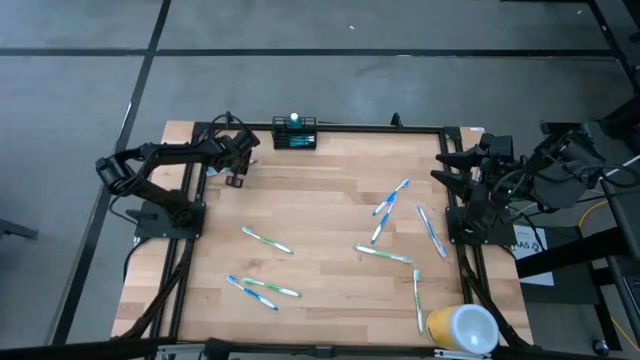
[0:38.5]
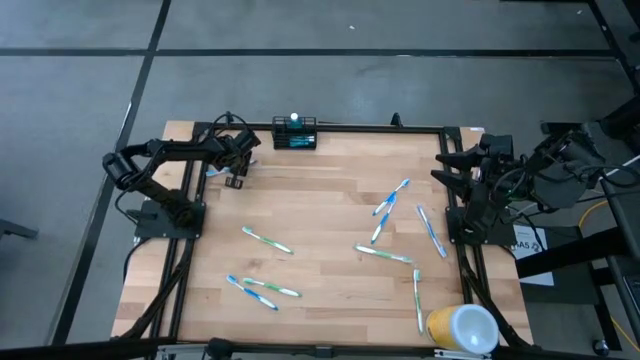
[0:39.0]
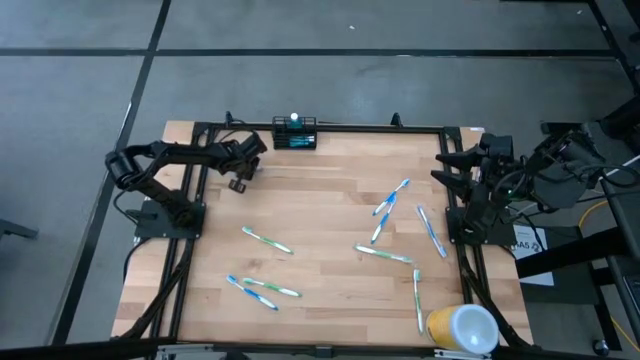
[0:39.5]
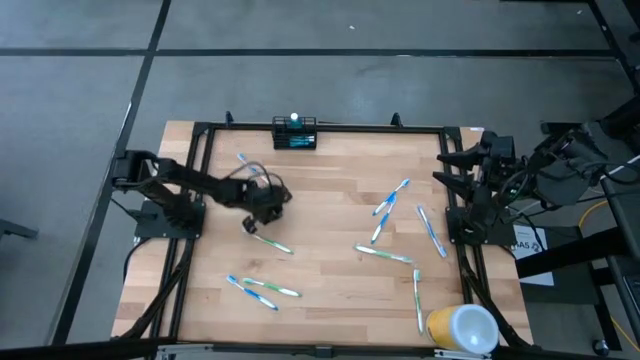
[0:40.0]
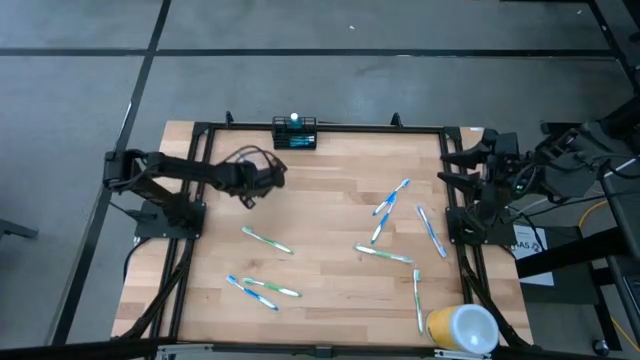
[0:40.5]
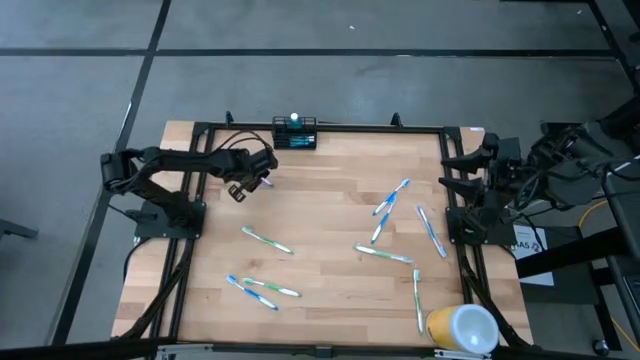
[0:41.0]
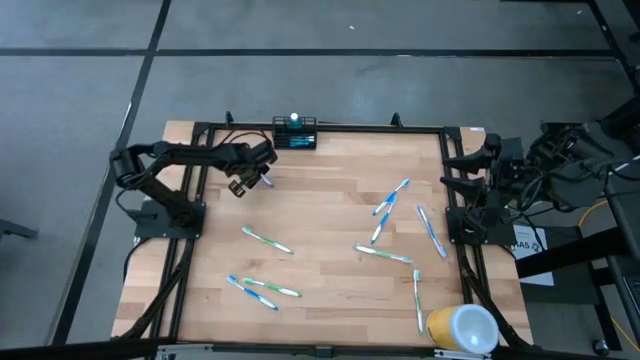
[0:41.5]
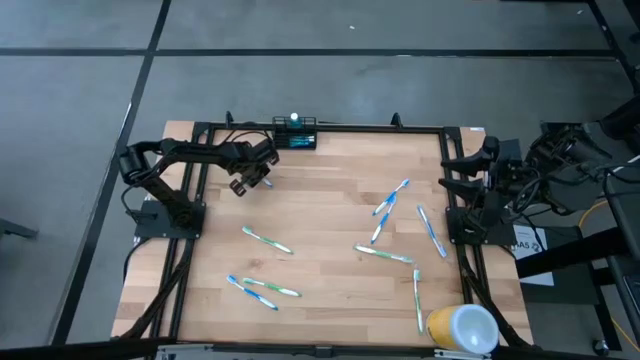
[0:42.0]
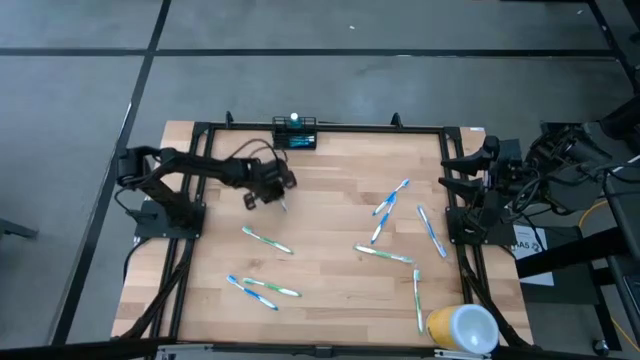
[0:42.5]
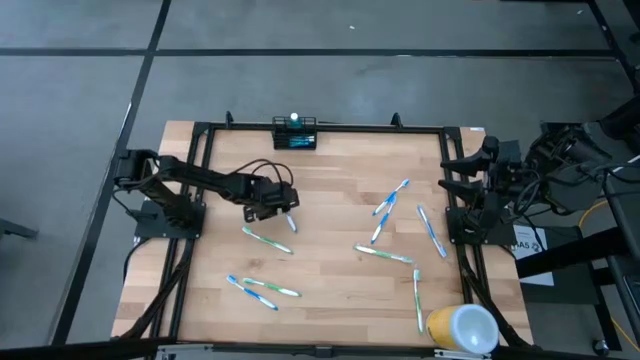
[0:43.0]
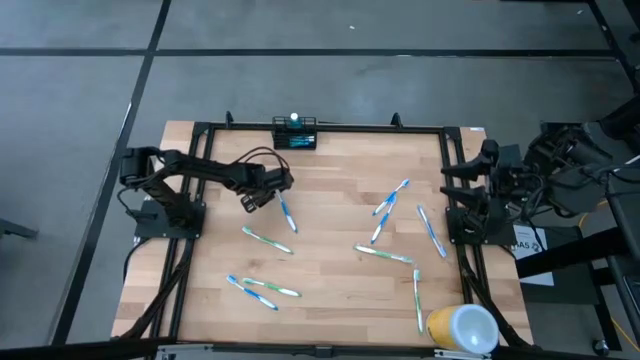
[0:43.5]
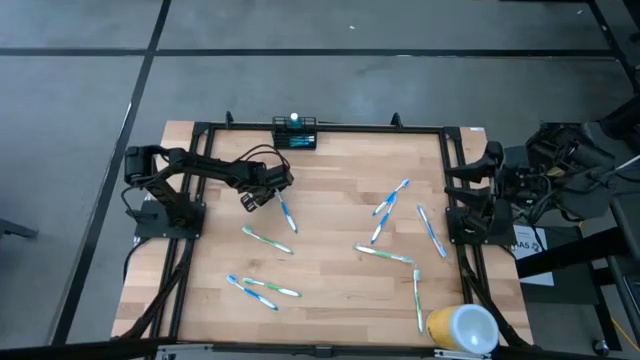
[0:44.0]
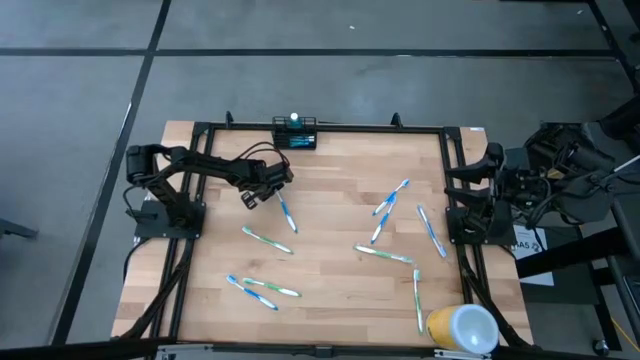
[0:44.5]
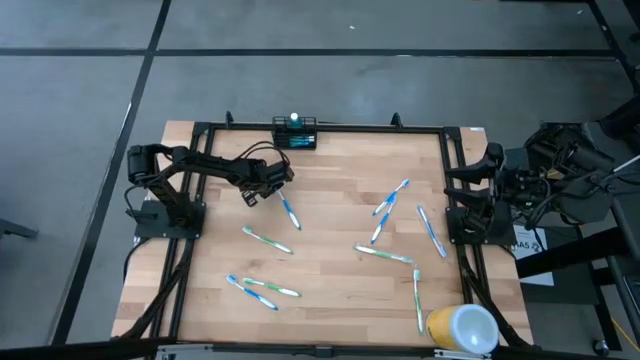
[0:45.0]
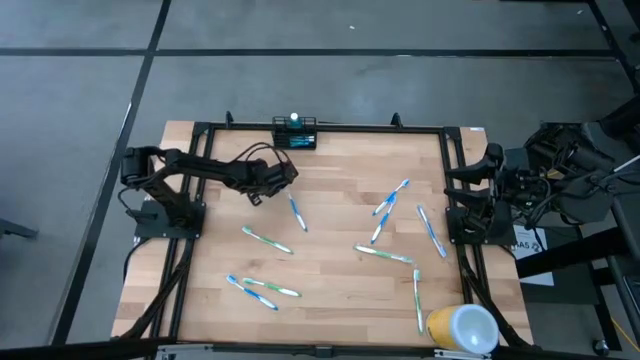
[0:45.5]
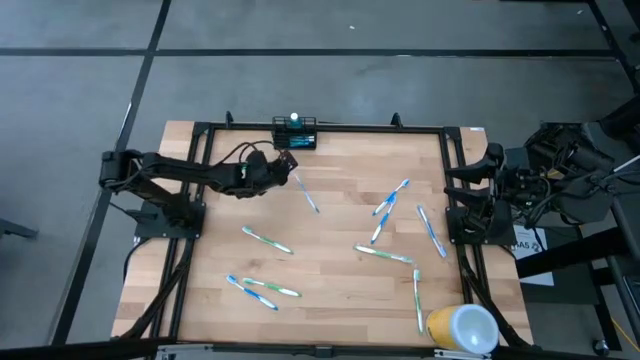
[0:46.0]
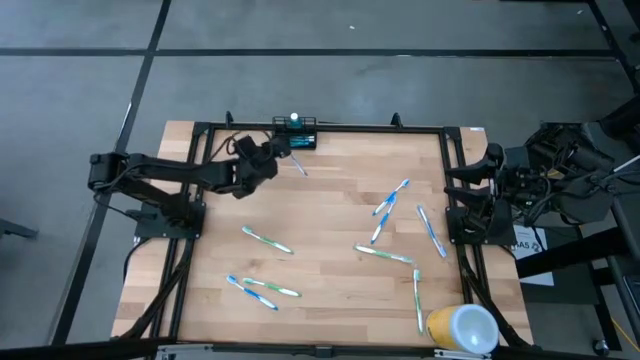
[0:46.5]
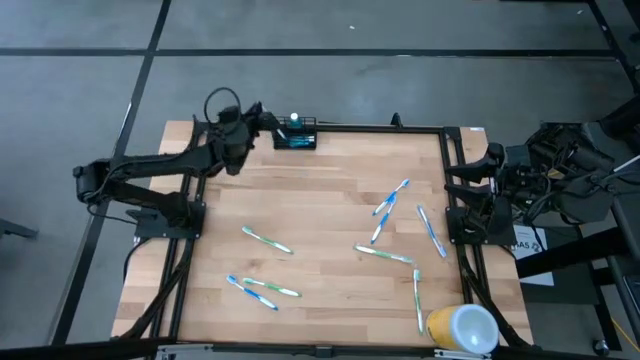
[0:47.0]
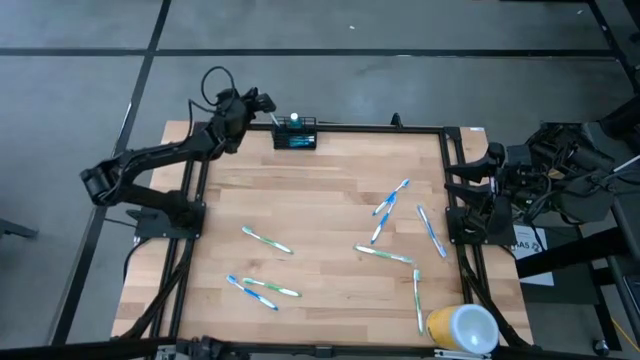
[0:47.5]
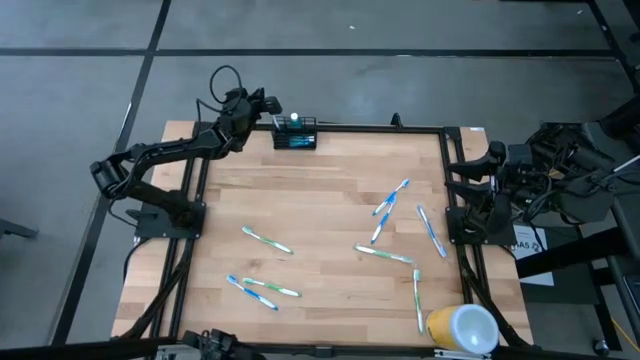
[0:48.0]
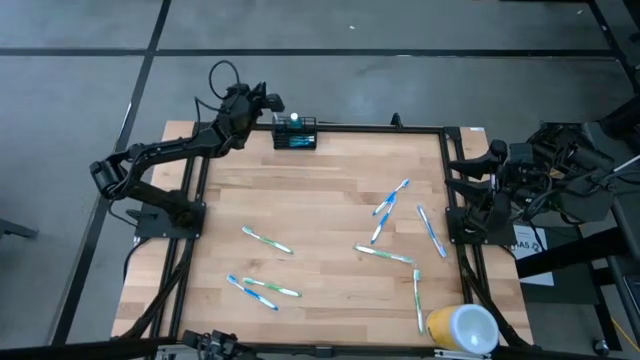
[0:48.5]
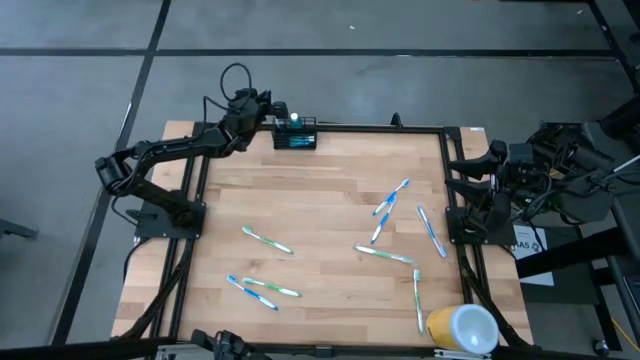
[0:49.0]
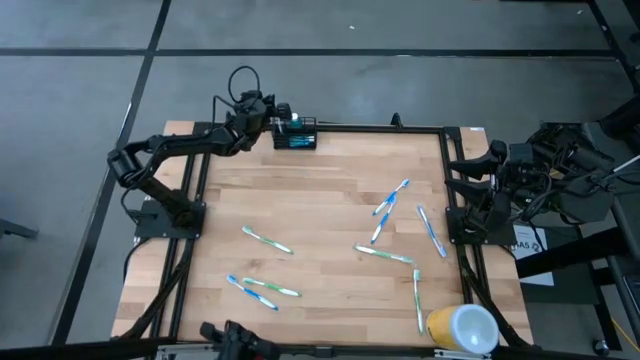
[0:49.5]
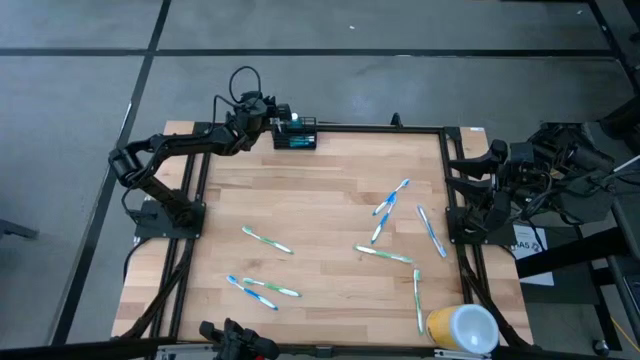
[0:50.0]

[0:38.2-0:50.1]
Task: Pick & Place toothbrushing station
Put the blue toothbrush into the black wire organizer

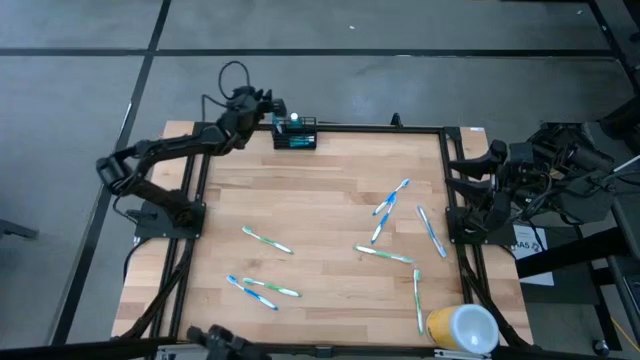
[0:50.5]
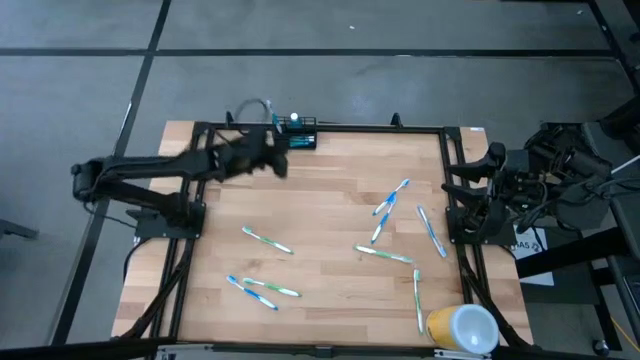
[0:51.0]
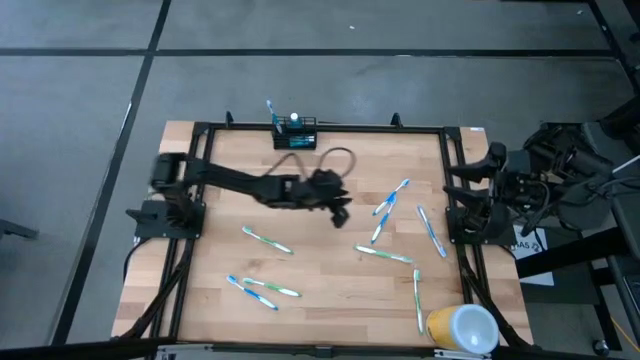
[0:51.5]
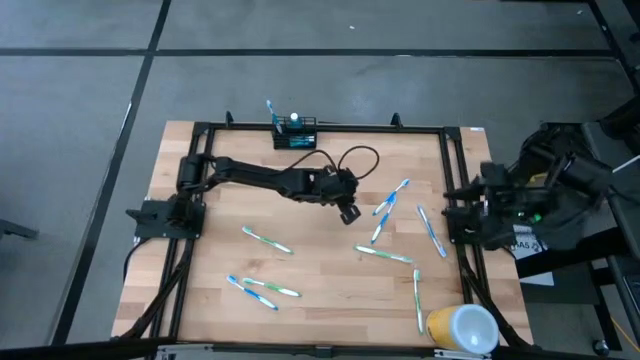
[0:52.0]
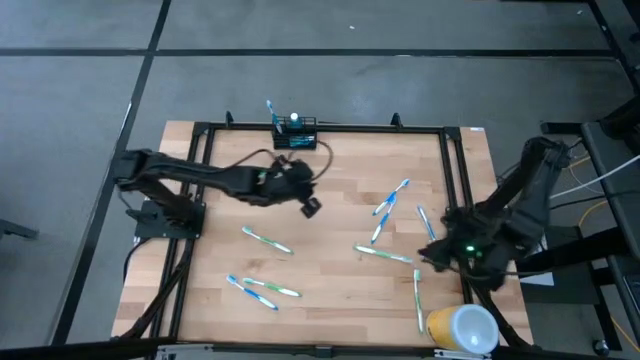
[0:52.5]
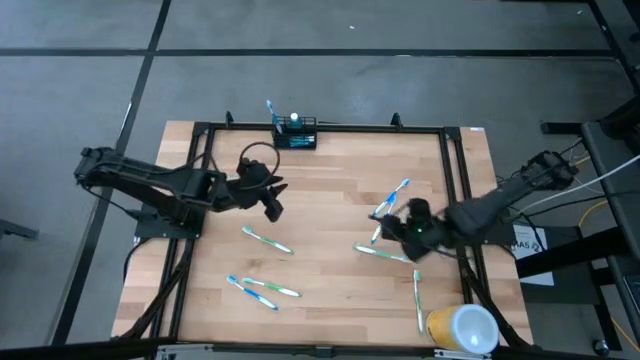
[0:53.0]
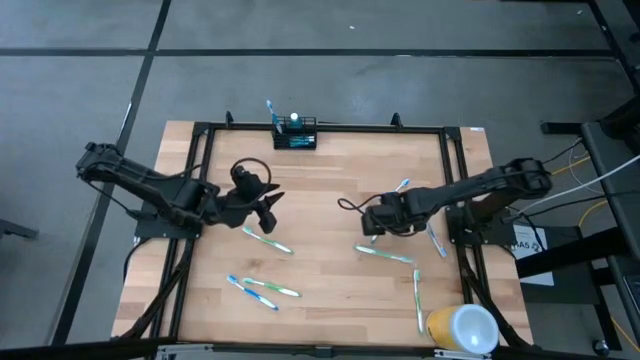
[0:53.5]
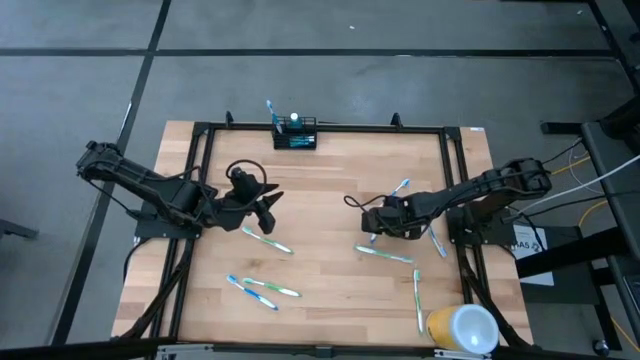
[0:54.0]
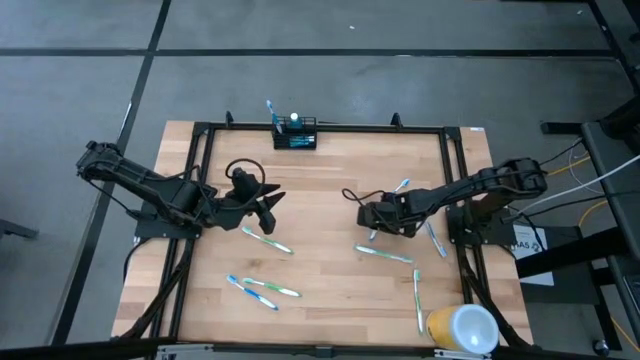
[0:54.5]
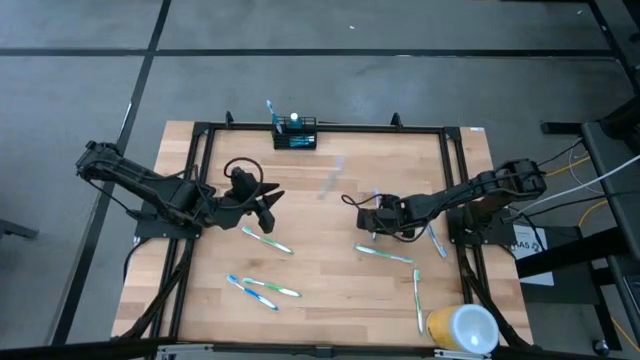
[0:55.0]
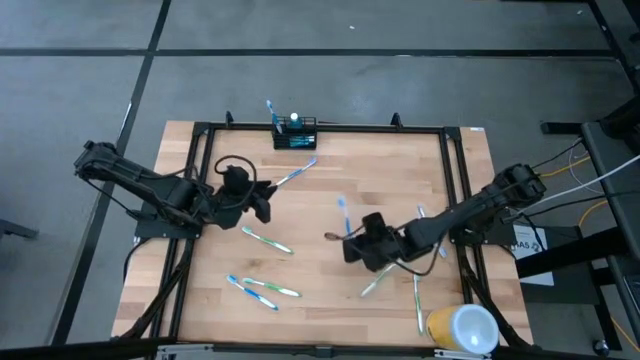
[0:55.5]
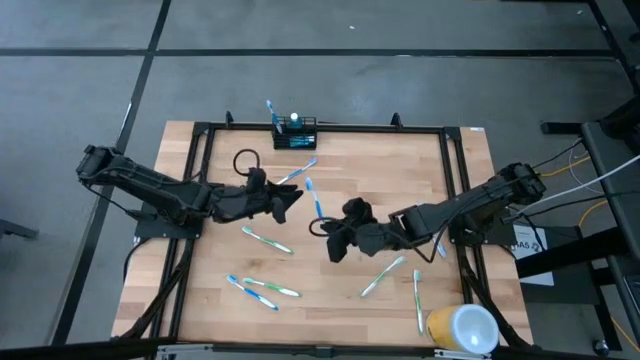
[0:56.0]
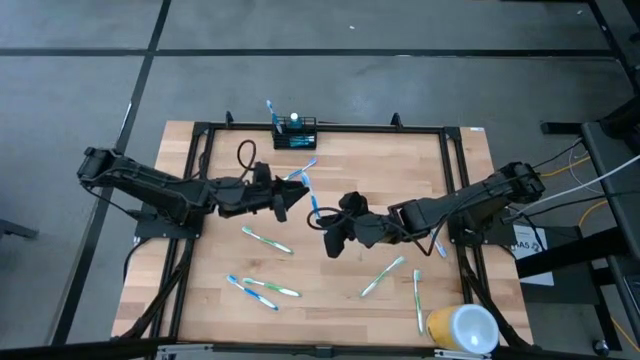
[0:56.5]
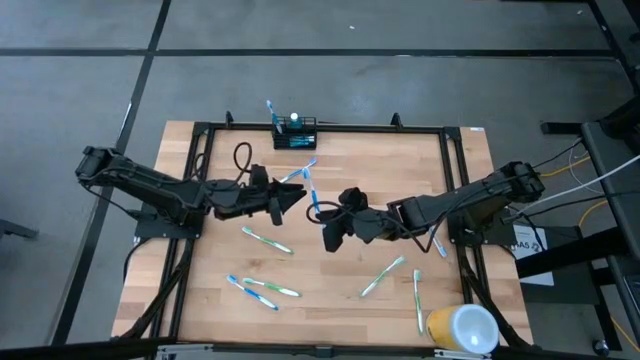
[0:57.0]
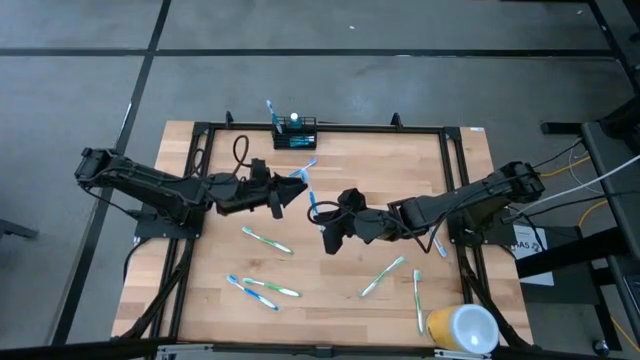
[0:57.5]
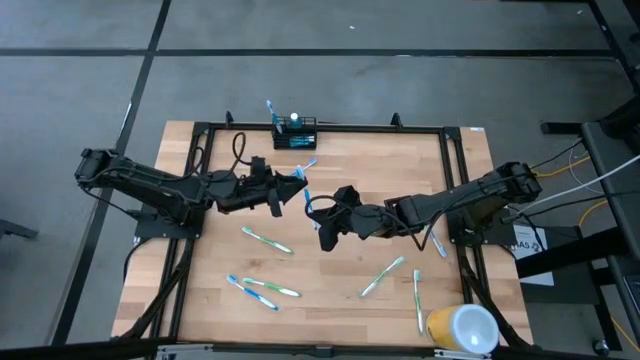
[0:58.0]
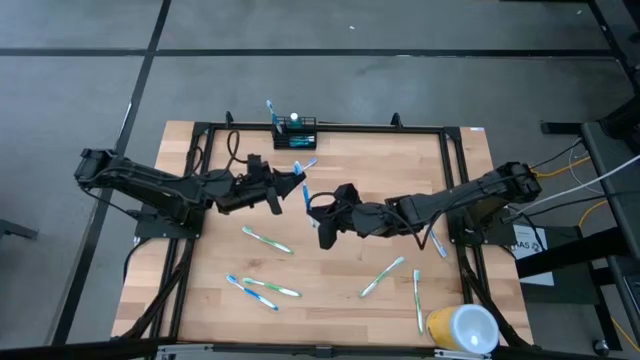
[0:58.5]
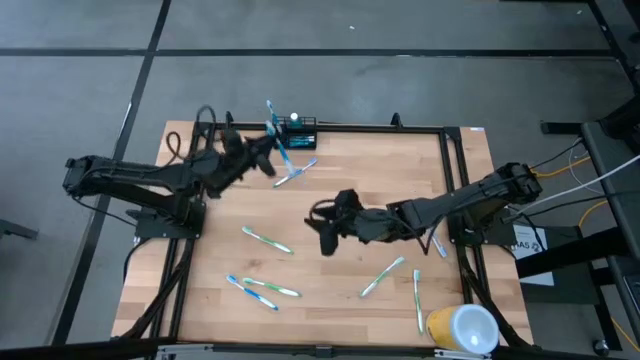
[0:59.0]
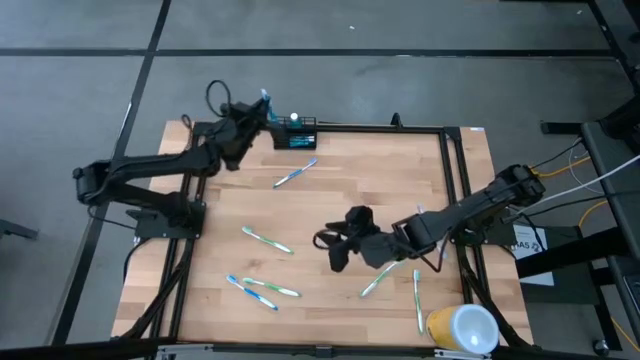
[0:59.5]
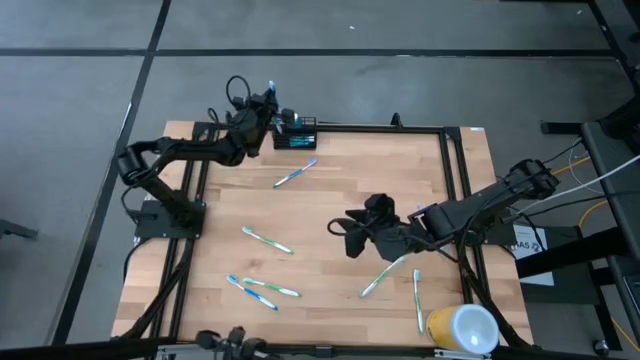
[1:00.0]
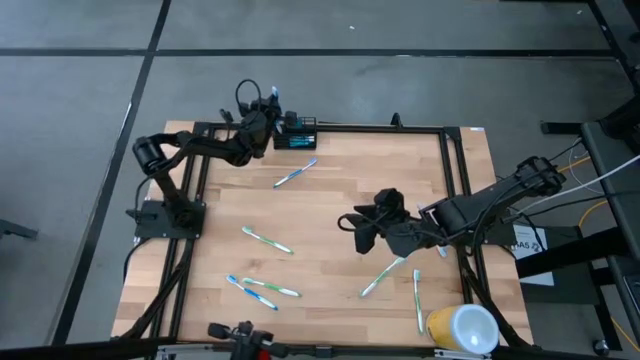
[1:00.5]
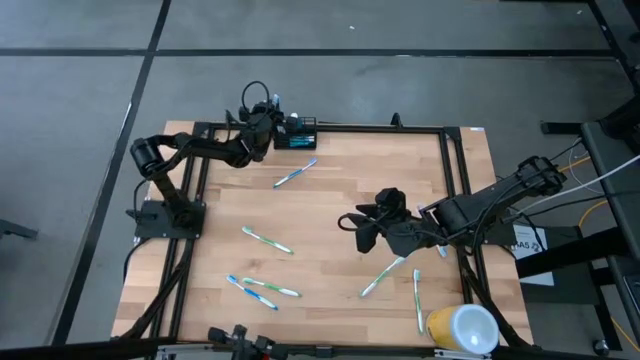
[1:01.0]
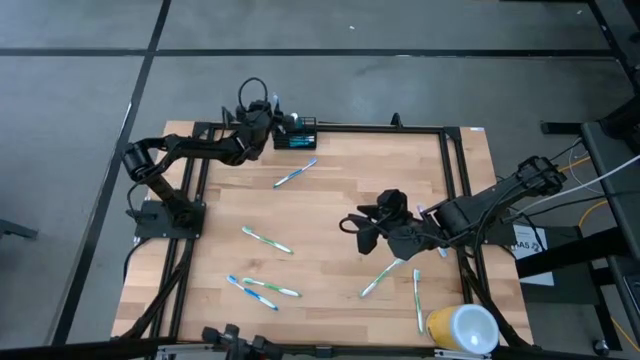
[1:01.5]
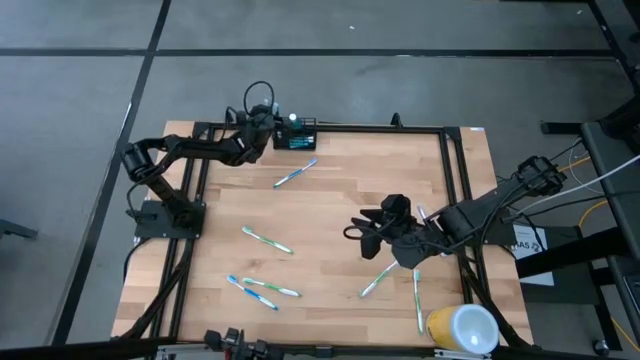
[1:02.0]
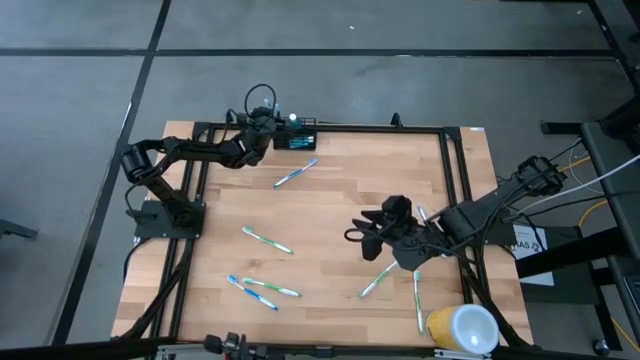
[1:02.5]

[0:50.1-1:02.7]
Put the blue toothbrush into the black wire organizer
